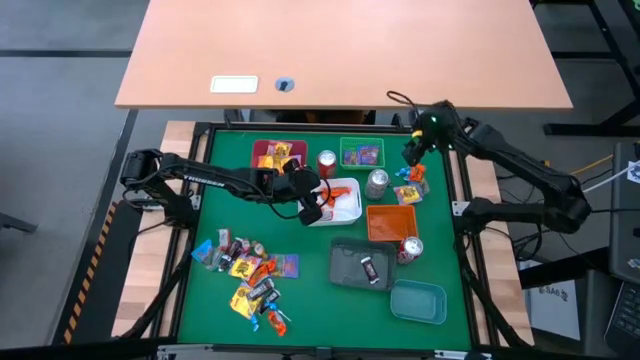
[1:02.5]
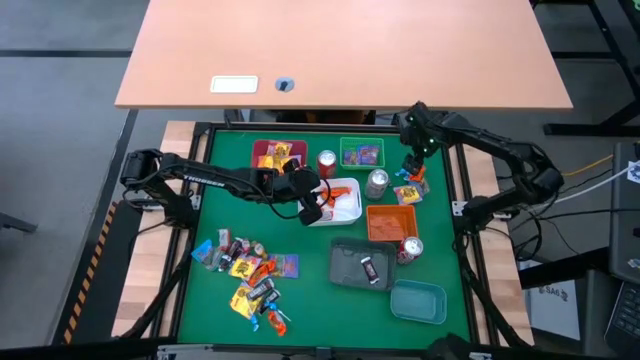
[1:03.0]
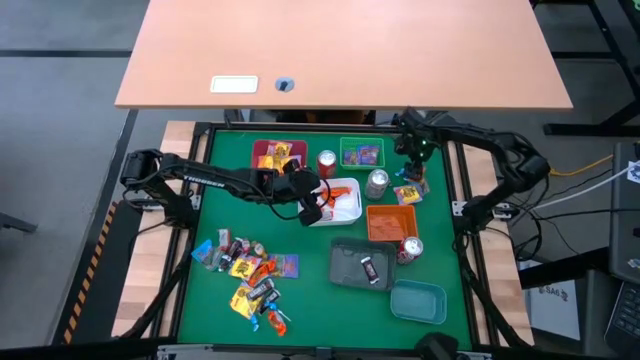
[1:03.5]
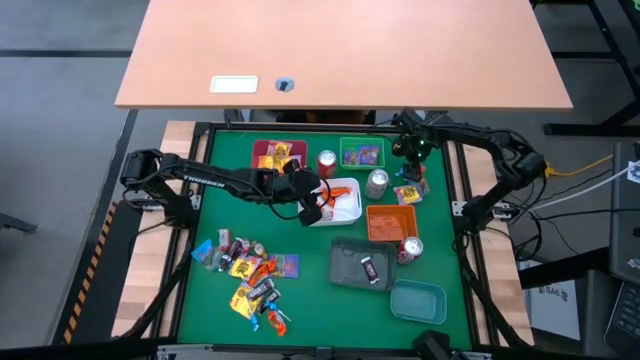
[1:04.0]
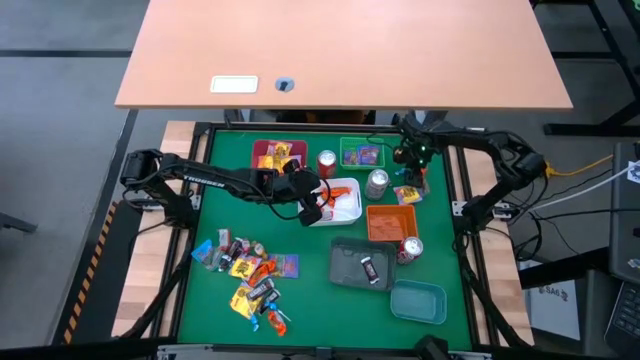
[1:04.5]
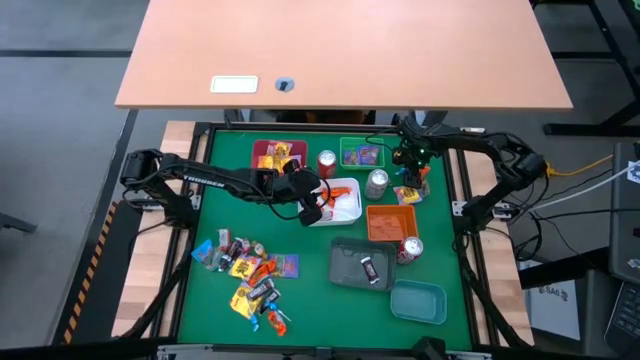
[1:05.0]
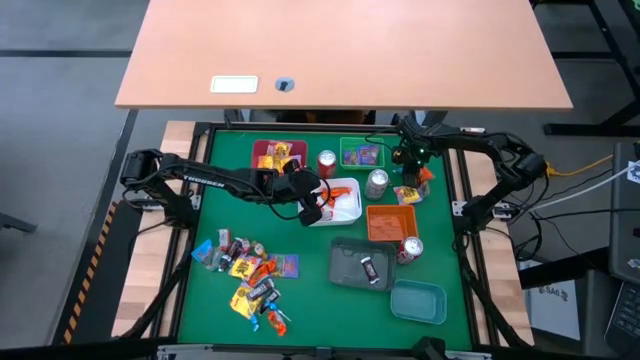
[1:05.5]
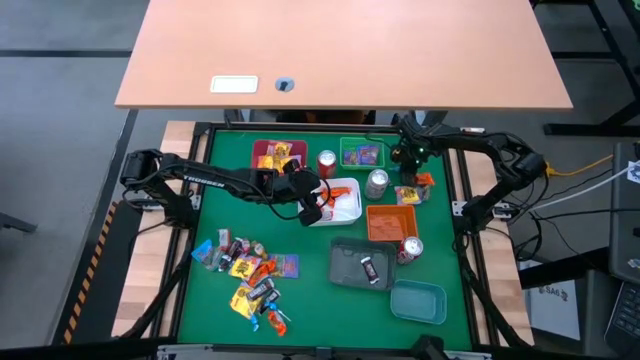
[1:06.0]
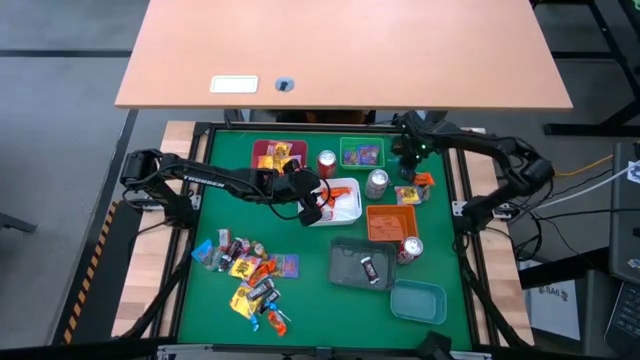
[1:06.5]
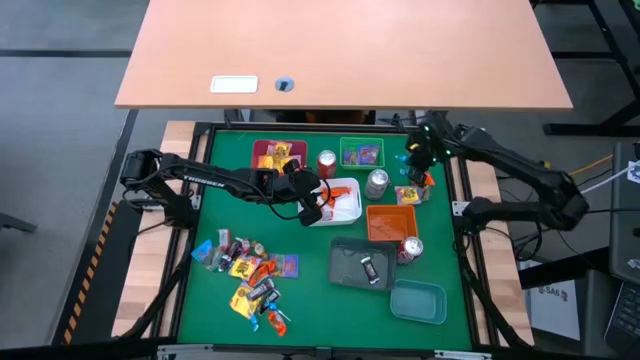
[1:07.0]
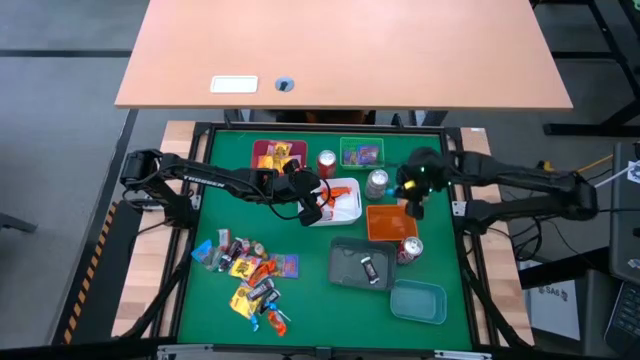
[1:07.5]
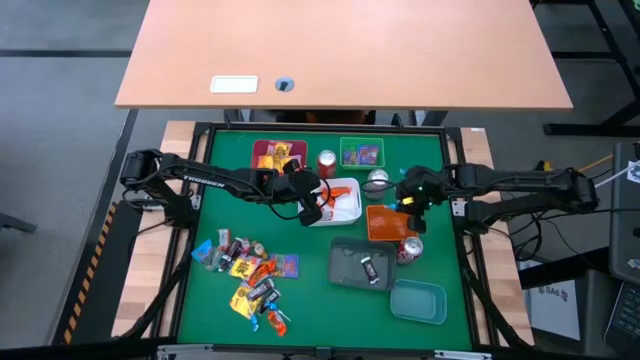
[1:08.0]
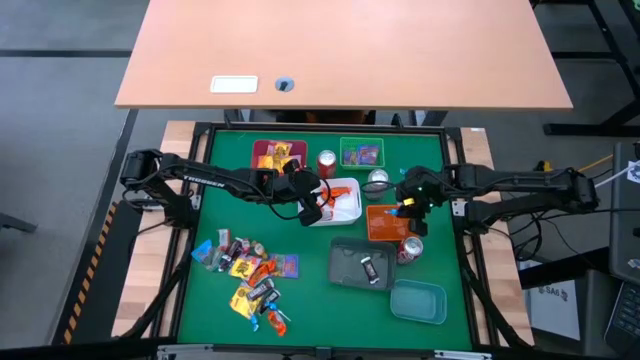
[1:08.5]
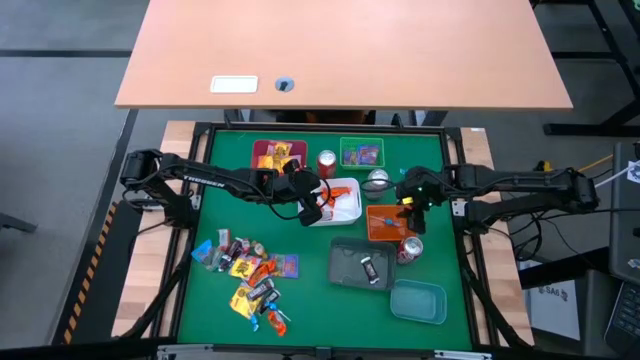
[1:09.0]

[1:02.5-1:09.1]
Task: Sort candy
Put the light blue candy into the orange bin

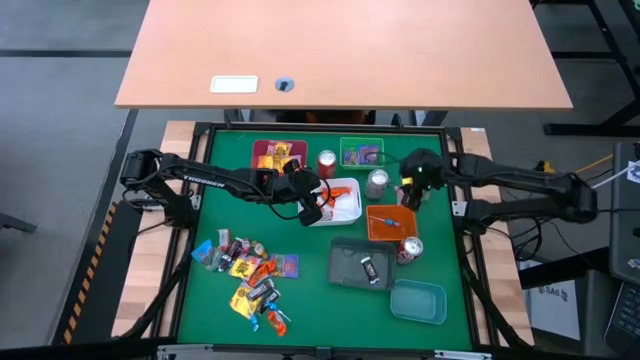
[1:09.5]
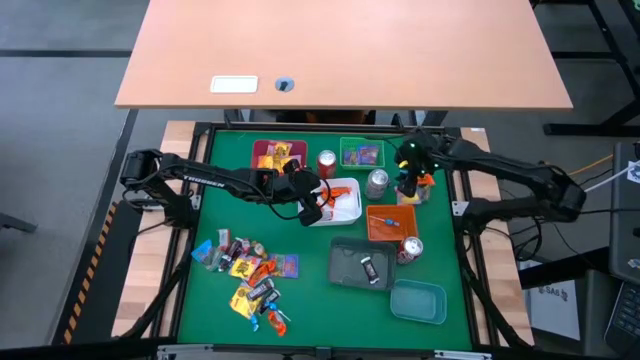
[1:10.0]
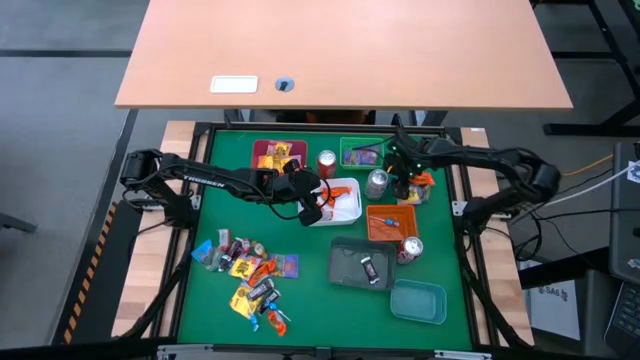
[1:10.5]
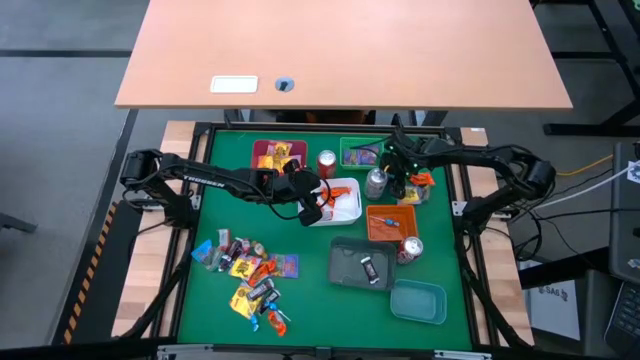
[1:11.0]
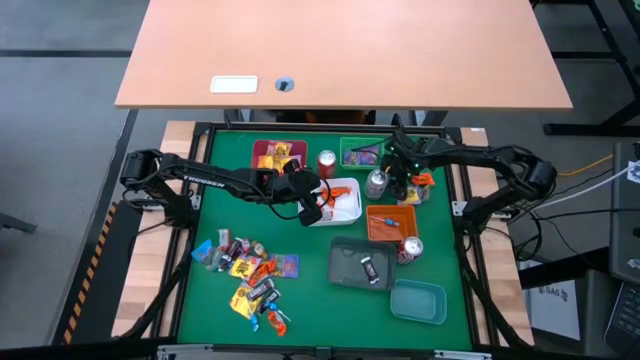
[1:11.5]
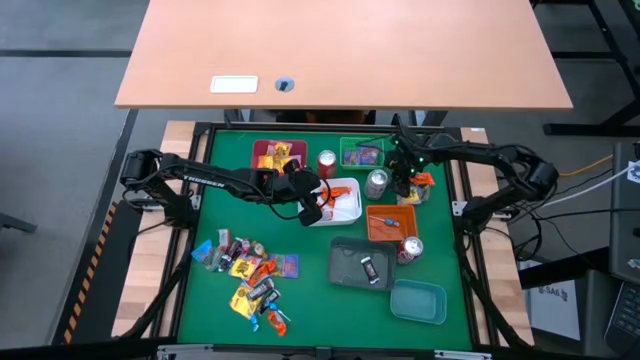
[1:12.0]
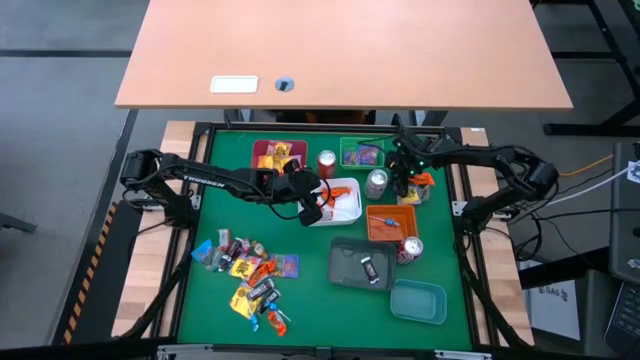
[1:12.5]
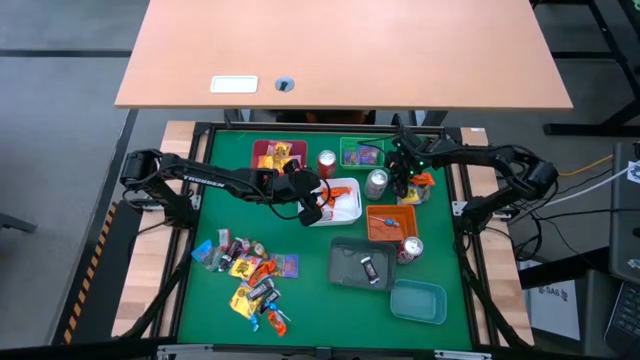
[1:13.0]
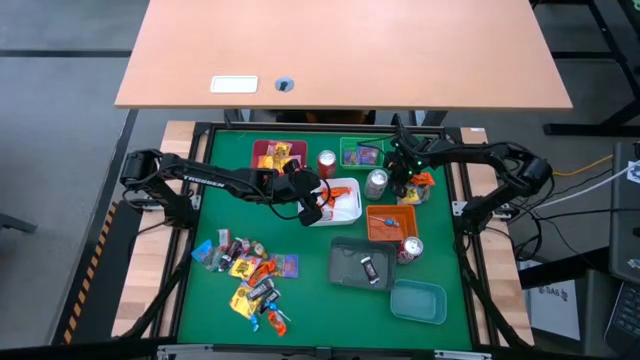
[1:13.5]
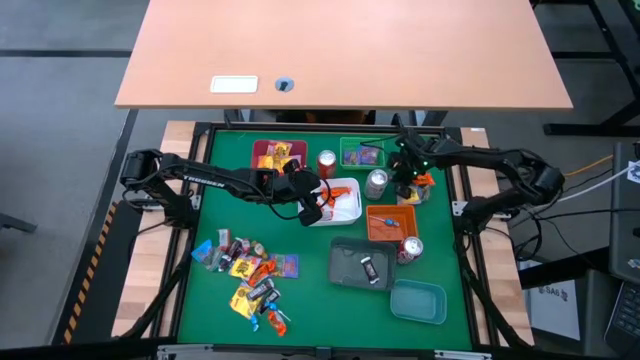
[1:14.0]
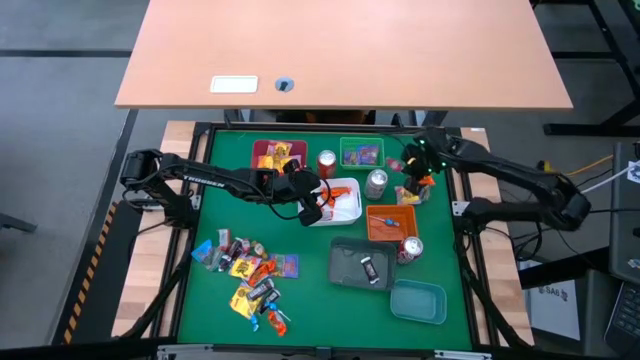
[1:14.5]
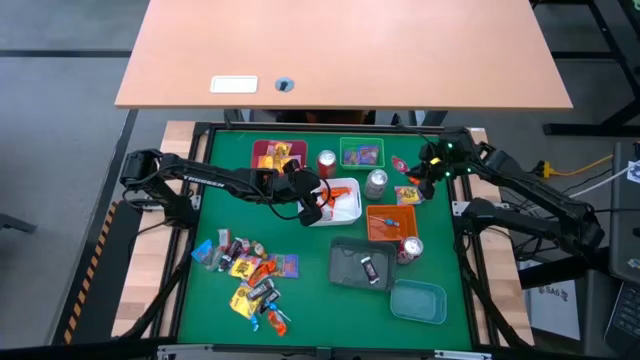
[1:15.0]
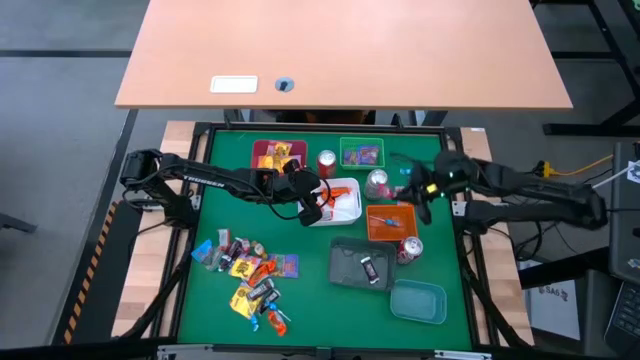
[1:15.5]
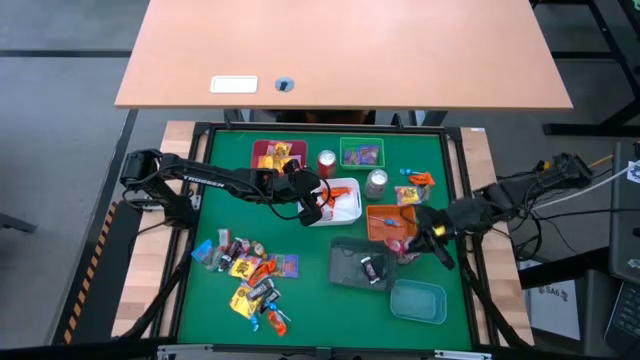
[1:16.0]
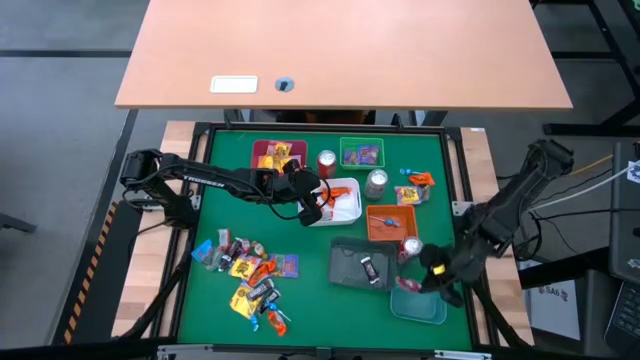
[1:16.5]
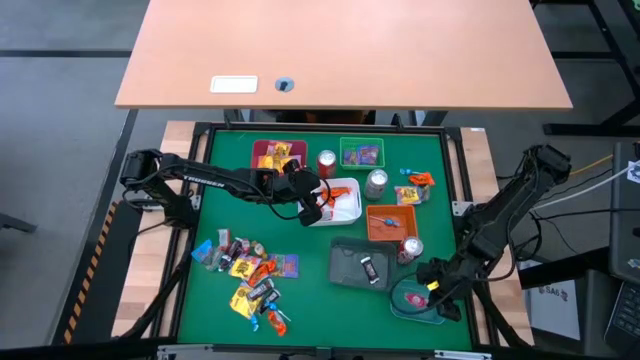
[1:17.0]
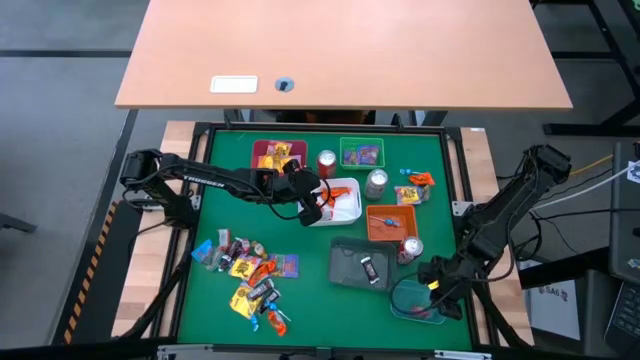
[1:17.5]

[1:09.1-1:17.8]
Put the red candy into the dark green bin

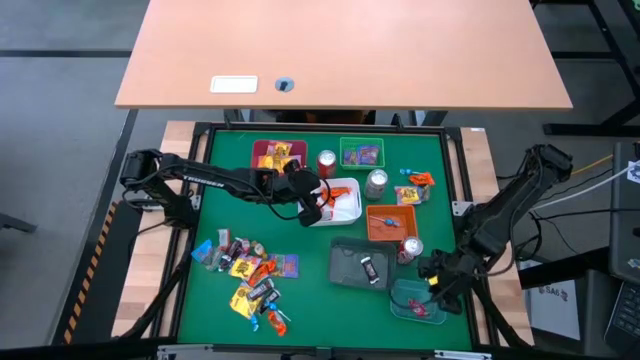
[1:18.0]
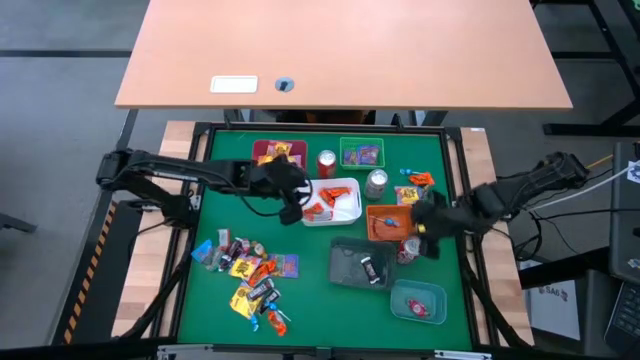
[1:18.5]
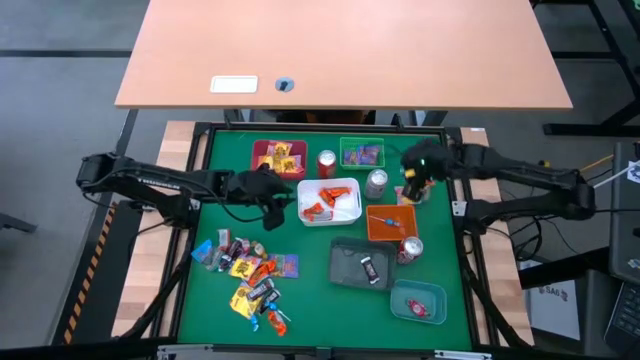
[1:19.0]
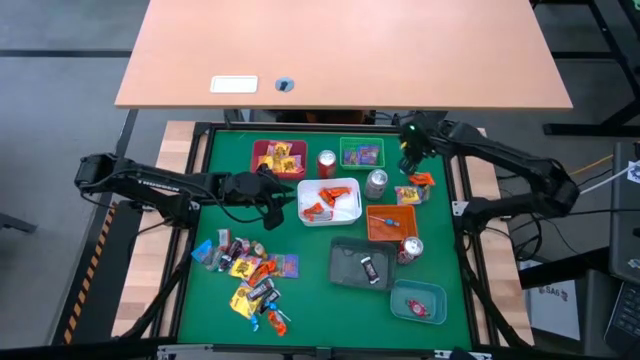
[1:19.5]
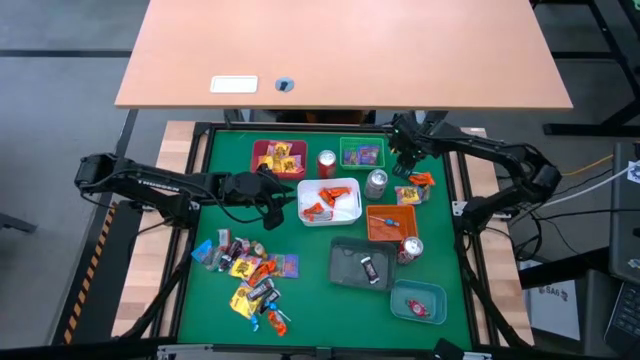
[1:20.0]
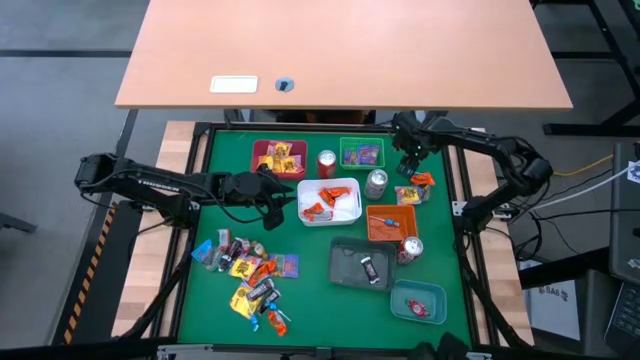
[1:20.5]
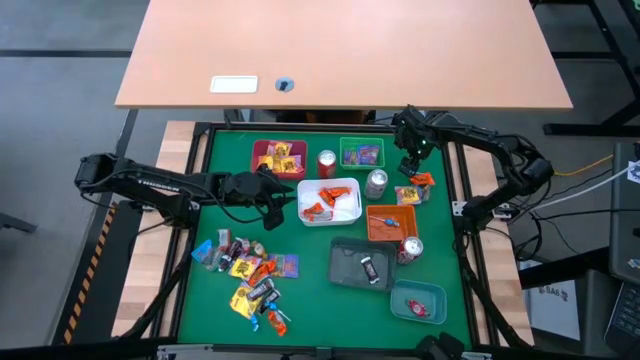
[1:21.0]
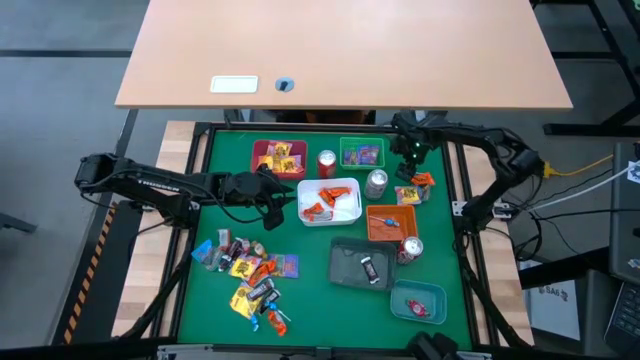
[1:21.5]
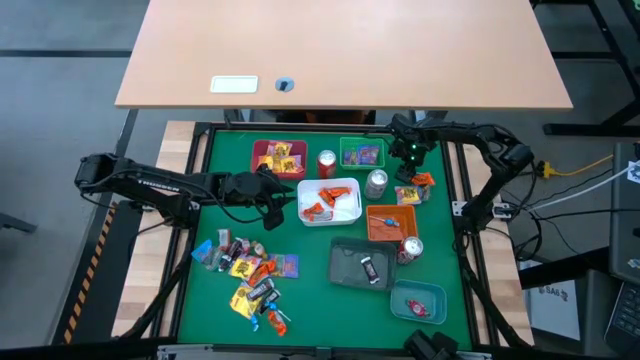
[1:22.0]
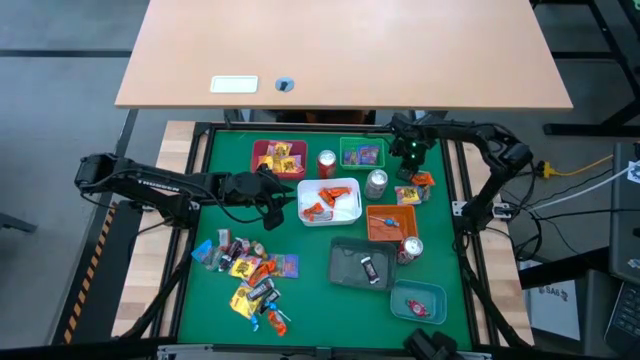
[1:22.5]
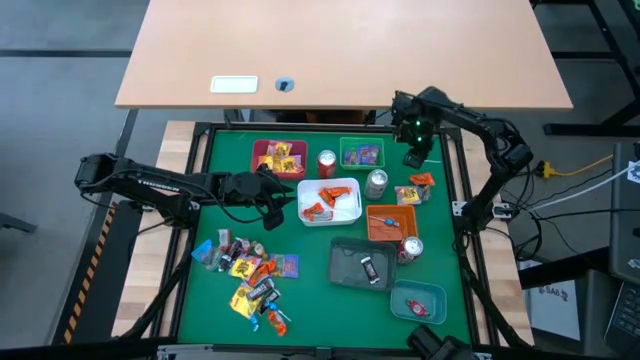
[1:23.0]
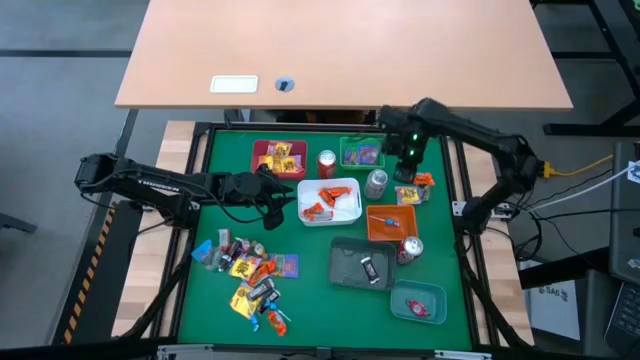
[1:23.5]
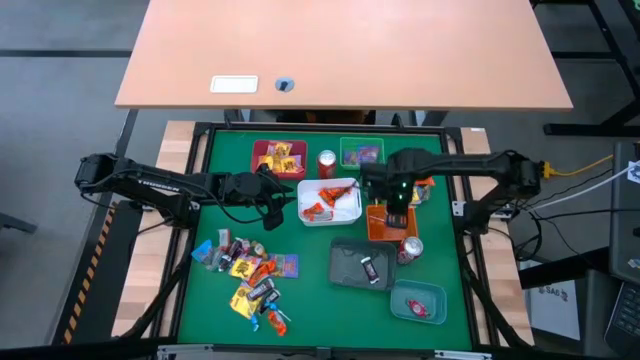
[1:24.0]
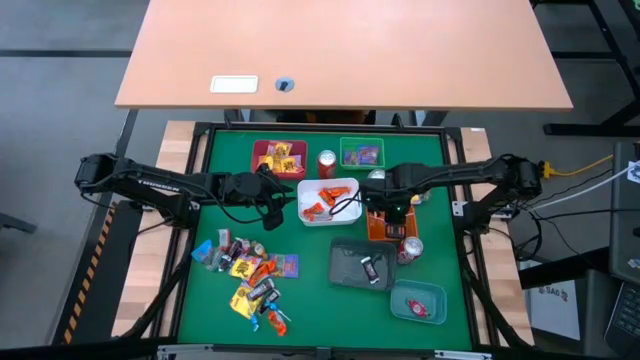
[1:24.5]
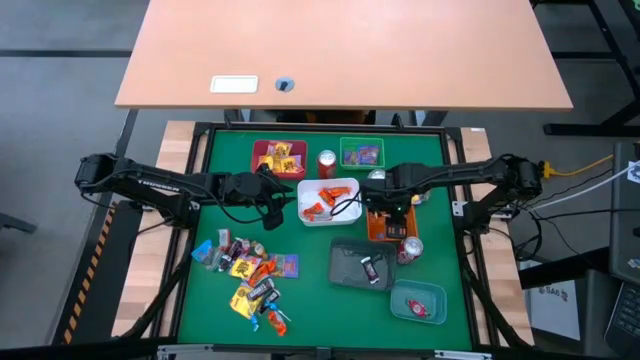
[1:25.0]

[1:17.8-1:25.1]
Put the light blue candy into the orange bin
